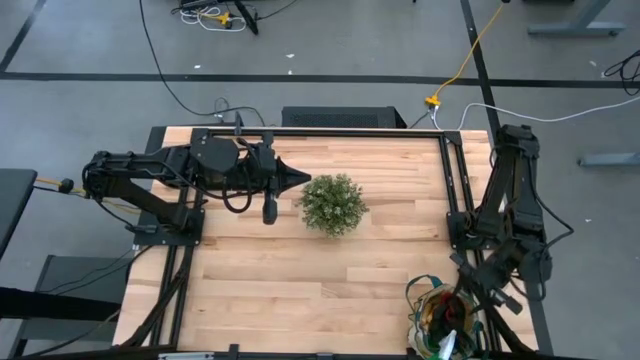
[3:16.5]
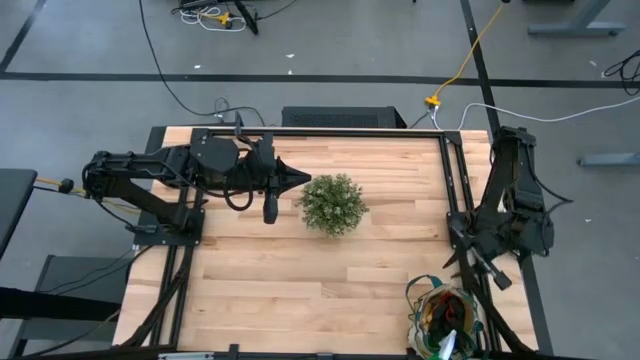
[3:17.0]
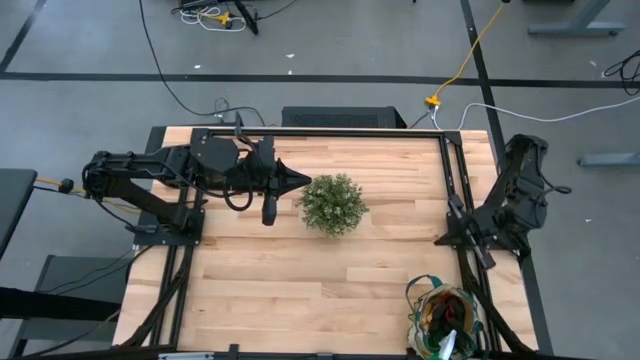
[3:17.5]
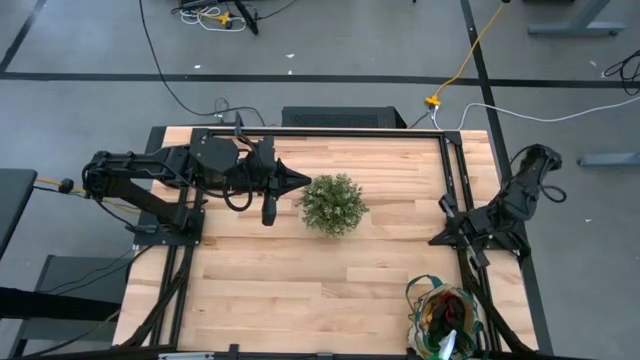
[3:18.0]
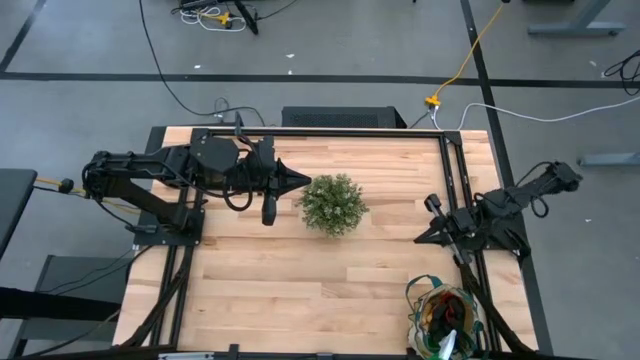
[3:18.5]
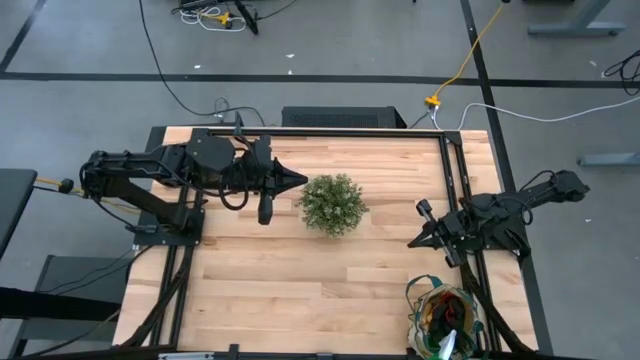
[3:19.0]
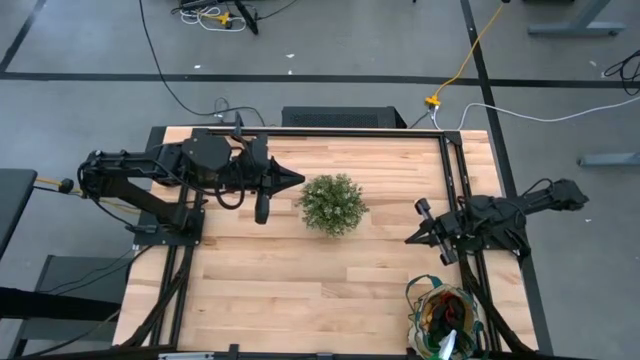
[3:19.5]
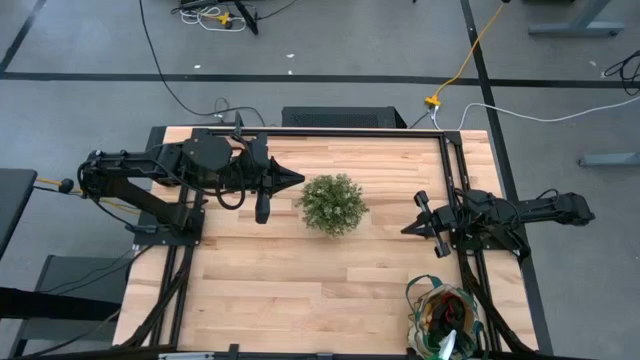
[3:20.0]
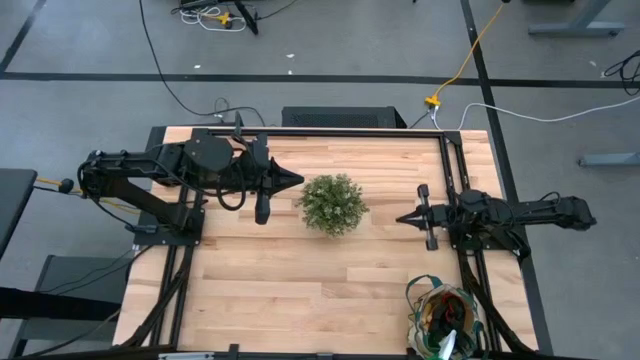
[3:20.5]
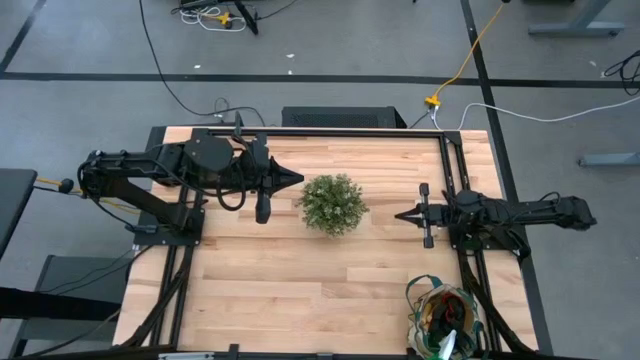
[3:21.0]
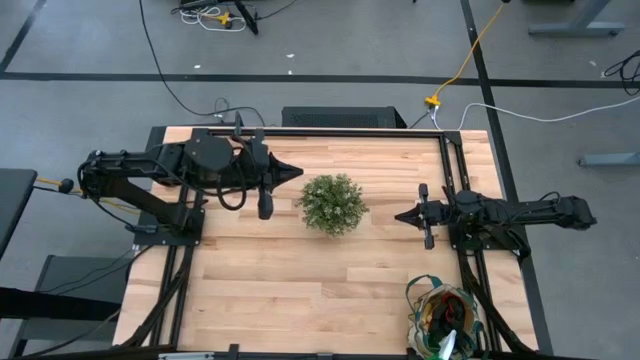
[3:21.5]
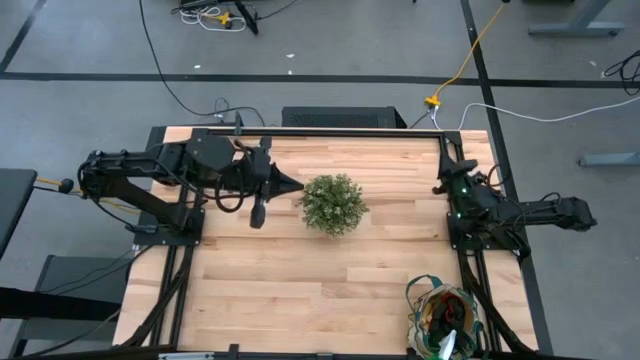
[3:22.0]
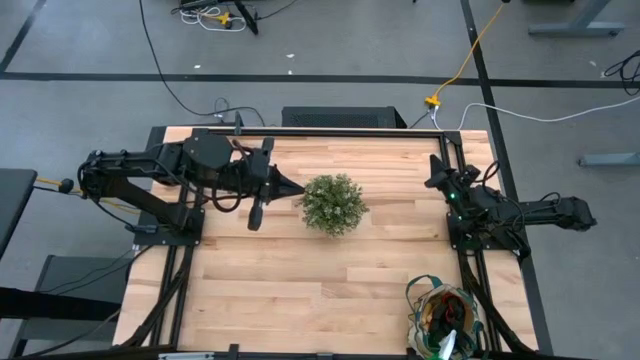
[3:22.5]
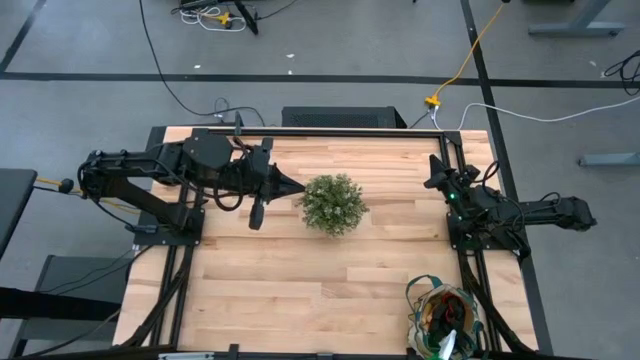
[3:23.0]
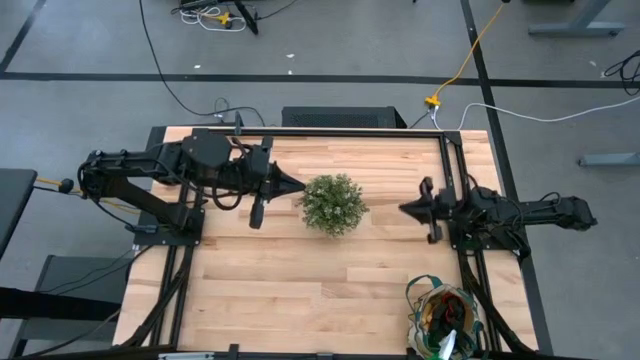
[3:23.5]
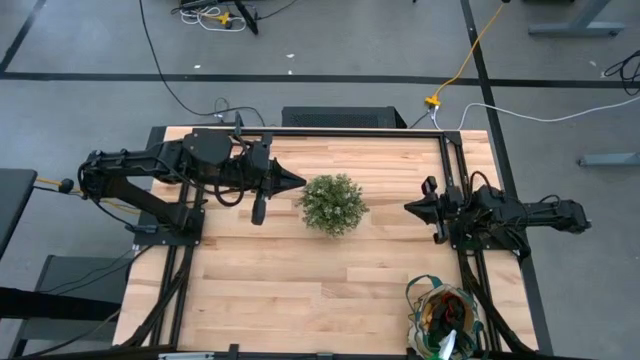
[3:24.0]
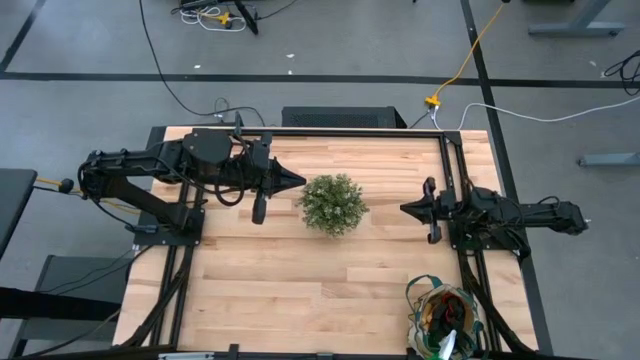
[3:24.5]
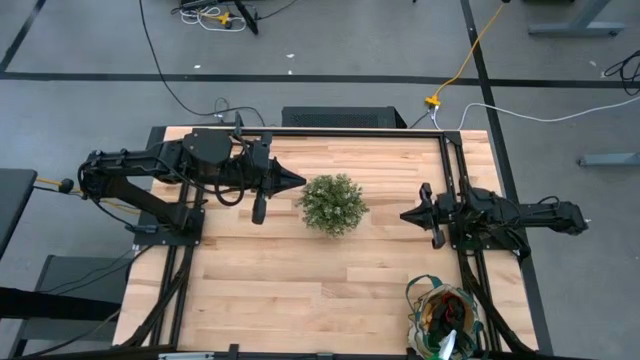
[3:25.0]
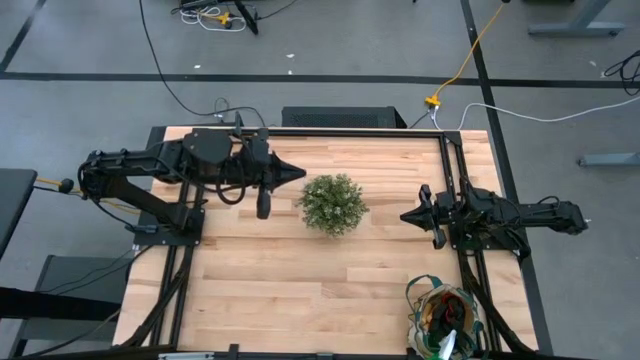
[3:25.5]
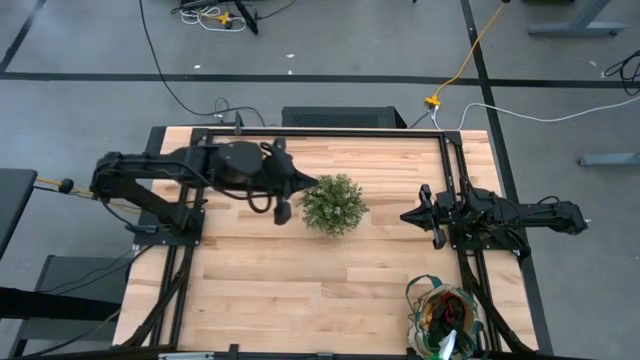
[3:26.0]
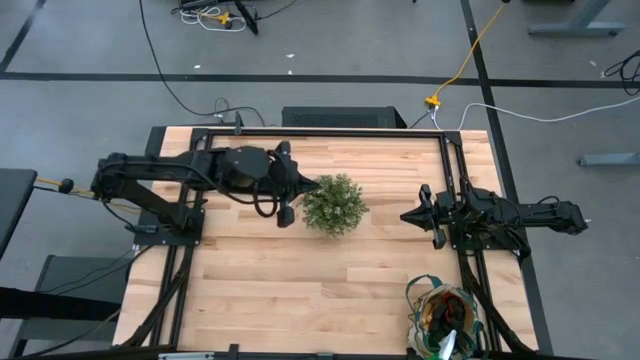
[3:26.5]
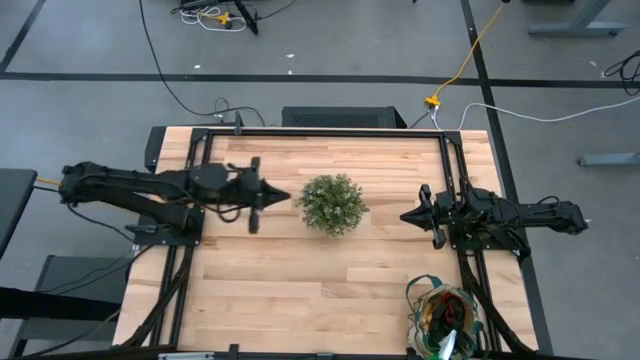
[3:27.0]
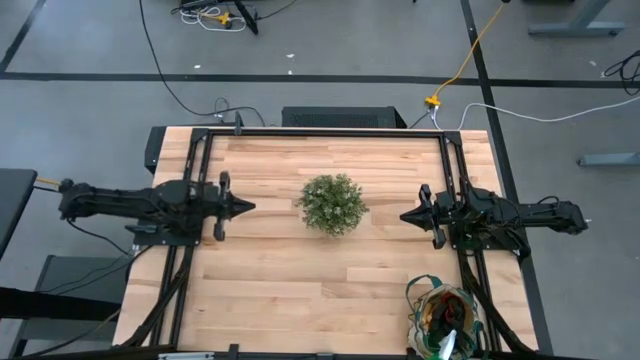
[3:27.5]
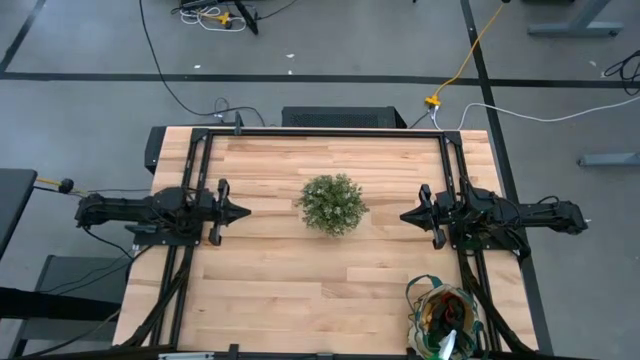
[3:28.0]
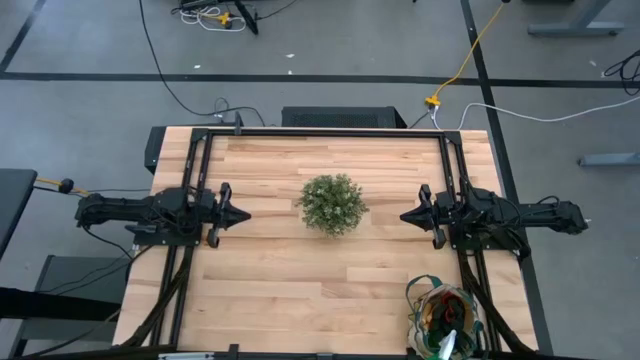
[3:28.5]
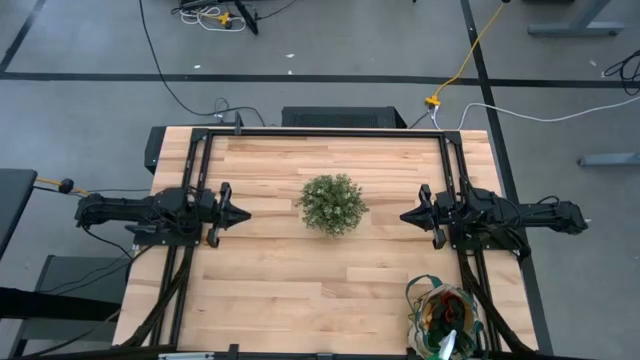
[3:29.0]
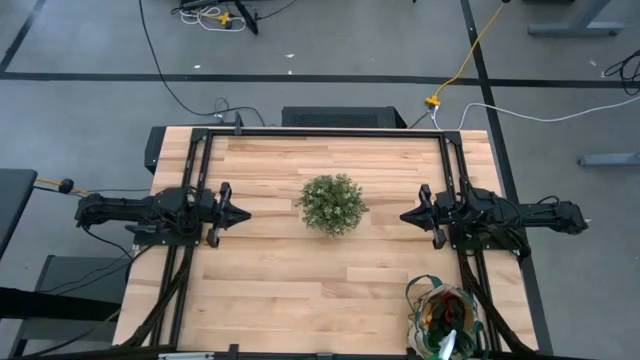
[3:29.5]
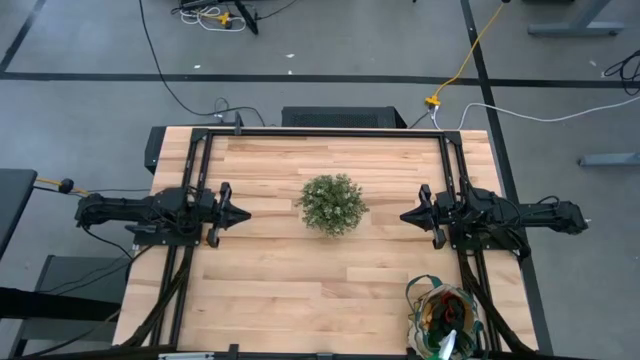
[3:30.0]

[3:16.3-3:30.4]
Task: Pick & Place Garden tools in Gardening bag
Return to Home Position

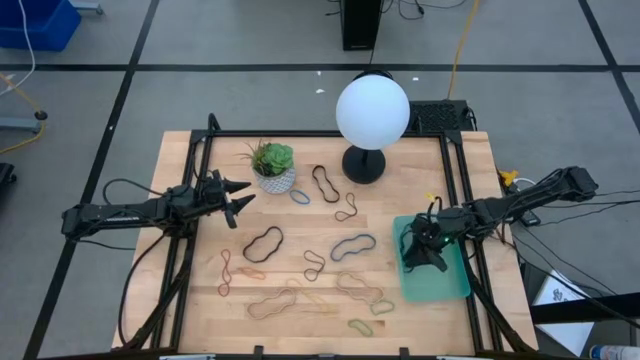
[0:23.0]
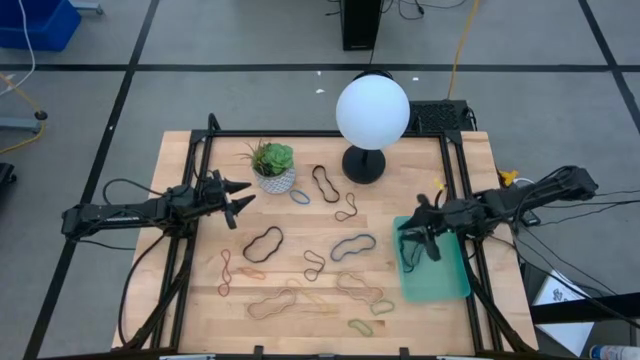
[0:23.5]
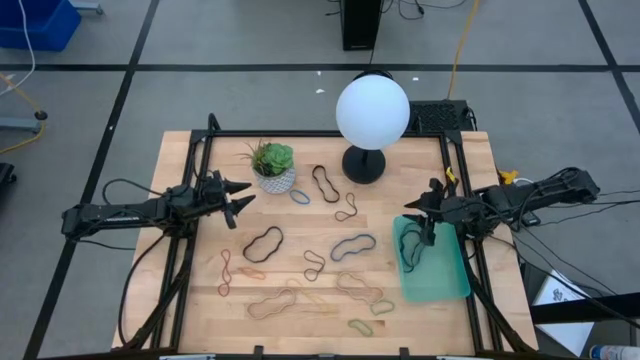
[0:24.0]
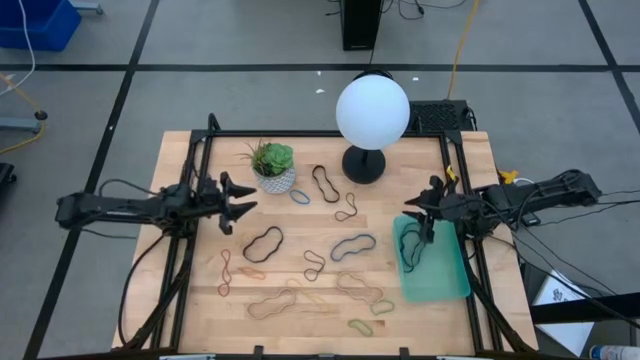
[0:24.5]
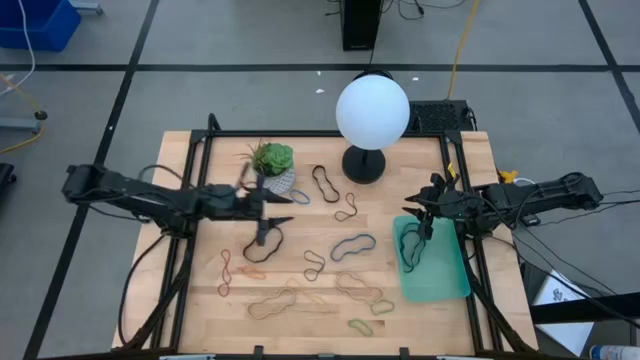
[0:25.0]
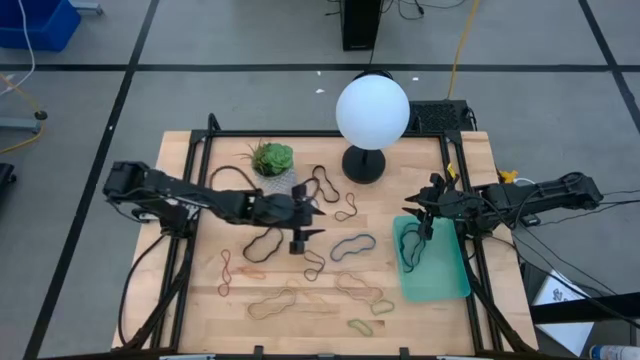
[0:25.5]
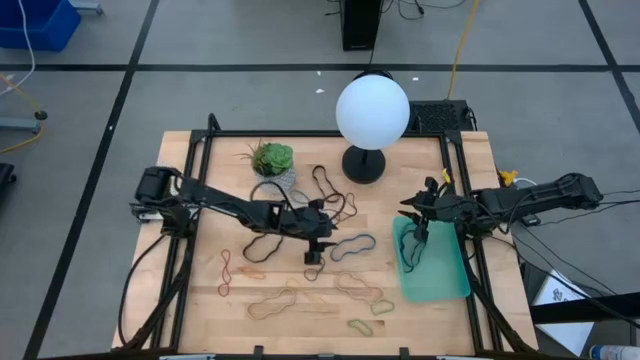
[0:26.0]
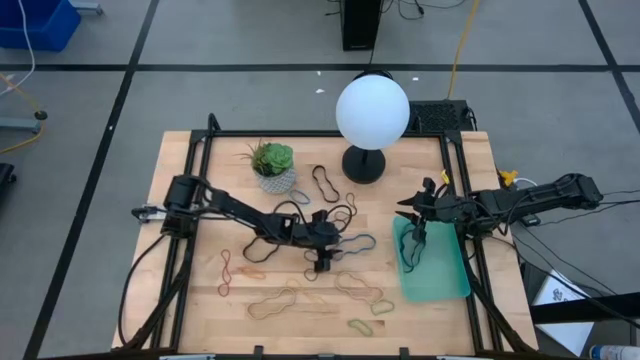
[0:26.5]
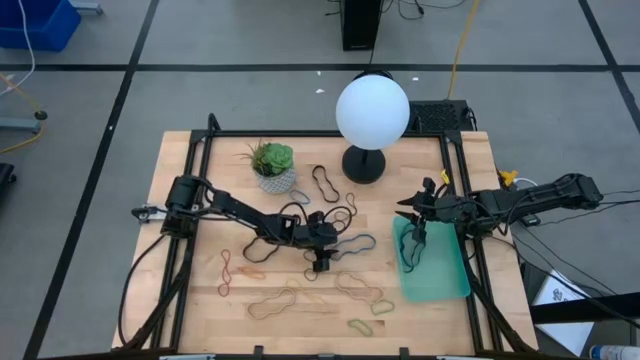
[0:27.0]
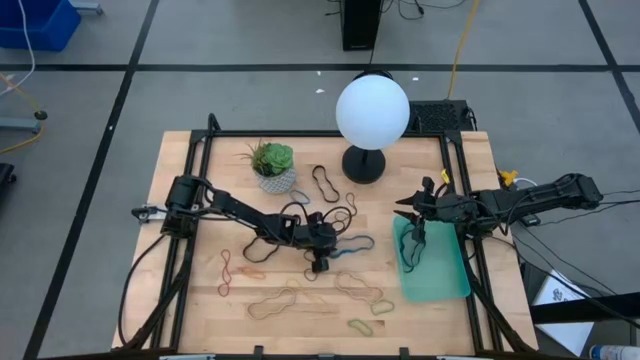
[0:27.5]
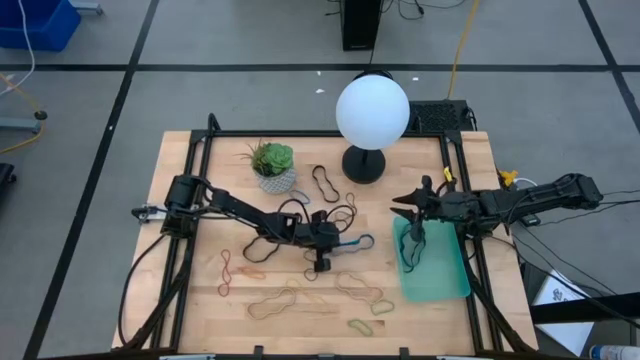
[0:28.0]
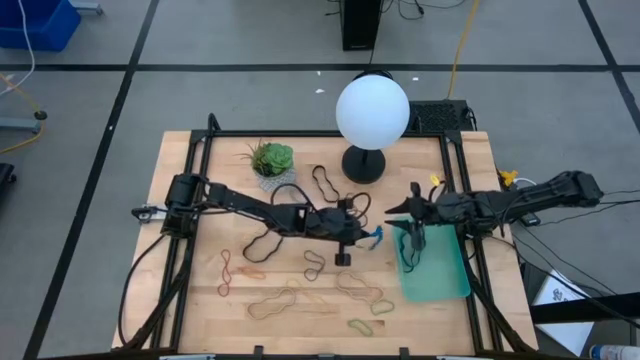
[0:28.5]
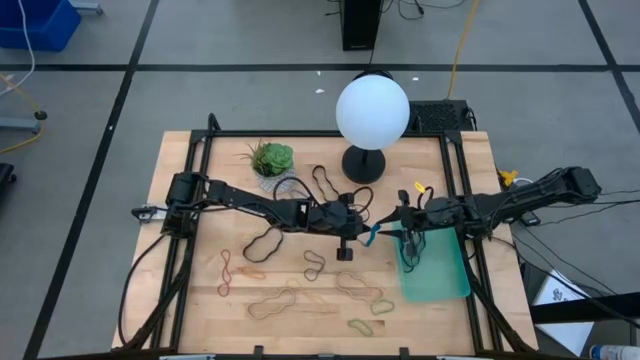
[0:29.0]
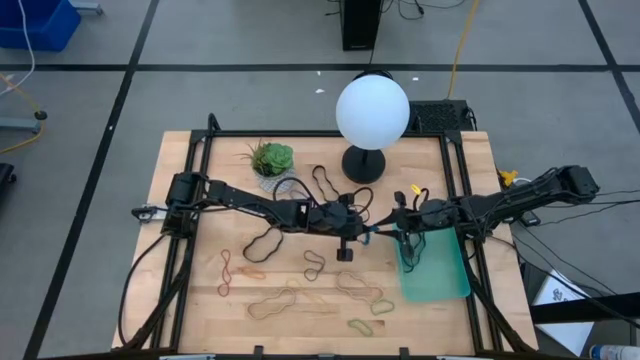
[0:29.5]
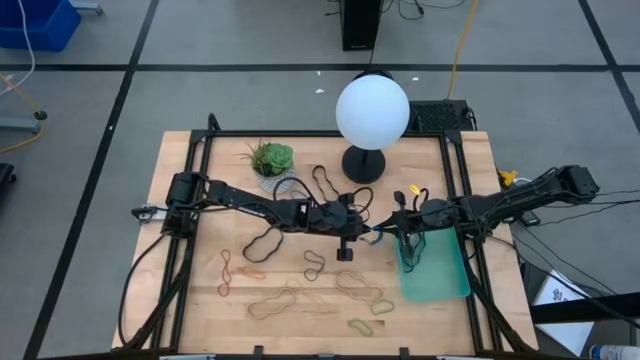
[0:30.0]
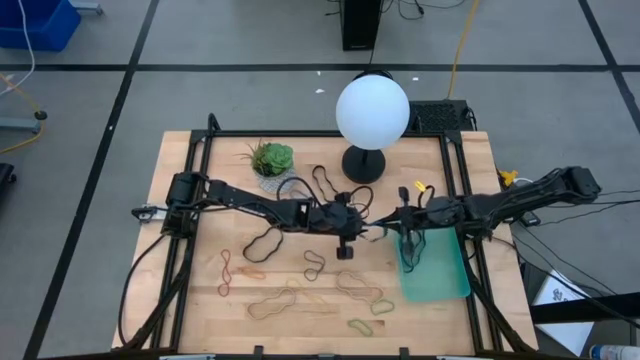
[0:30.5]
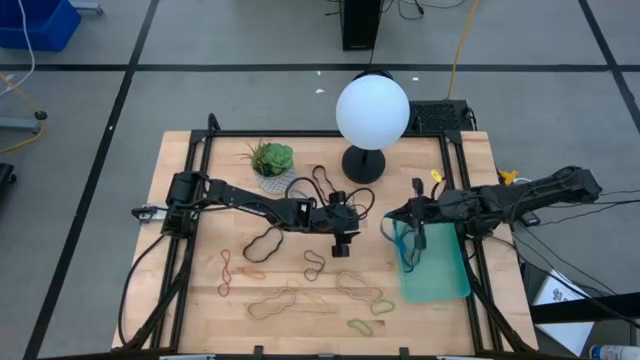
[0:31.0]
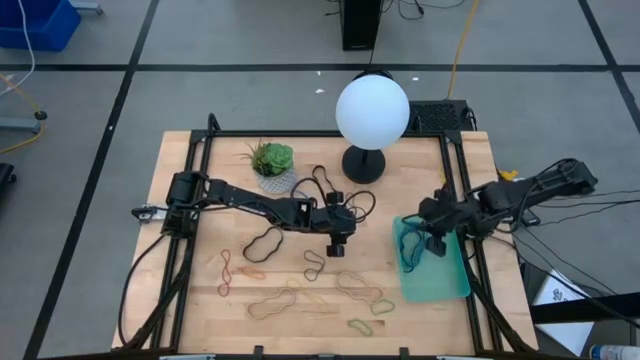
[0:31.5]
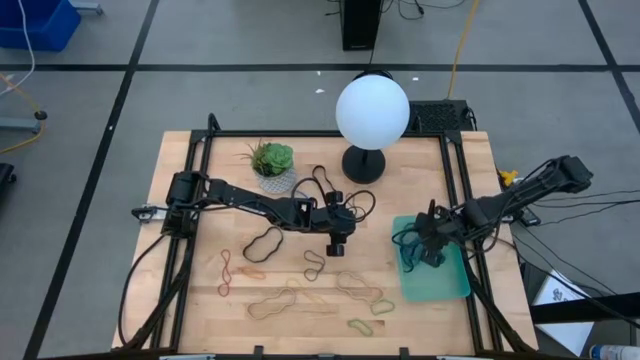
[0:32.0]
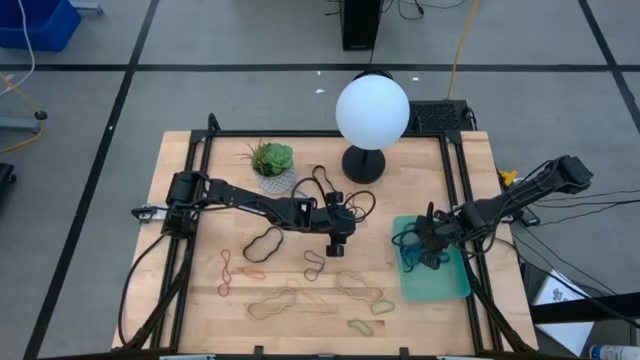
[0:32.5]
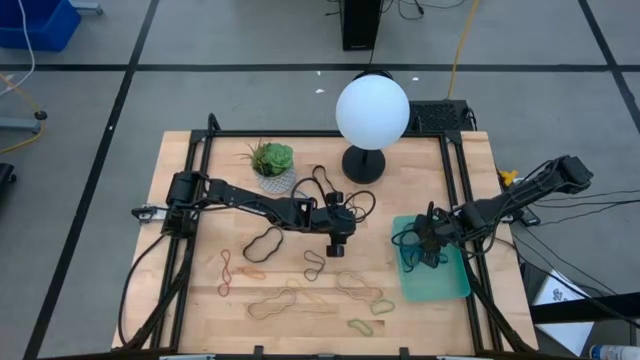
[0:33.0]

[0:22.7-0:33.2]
Task: Pick and place rubber bands into bin
Put the blue rubber band into the bin
